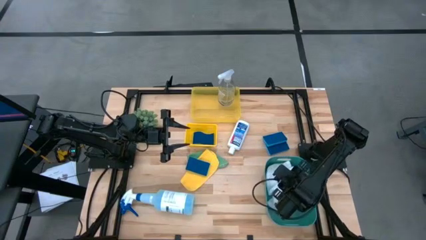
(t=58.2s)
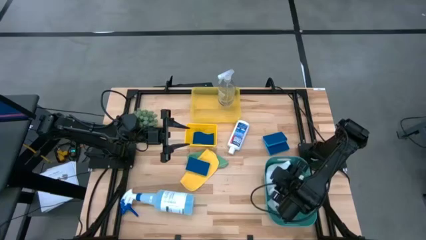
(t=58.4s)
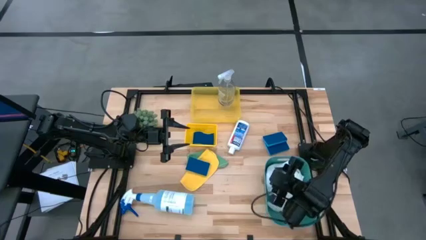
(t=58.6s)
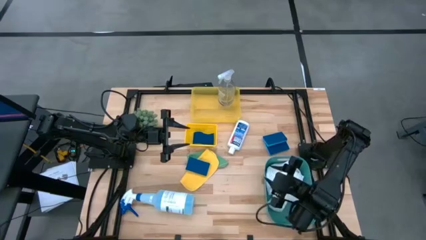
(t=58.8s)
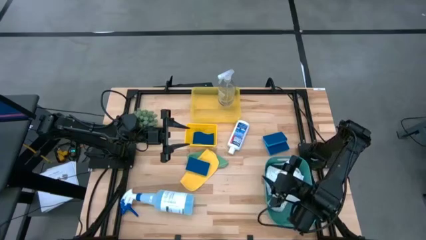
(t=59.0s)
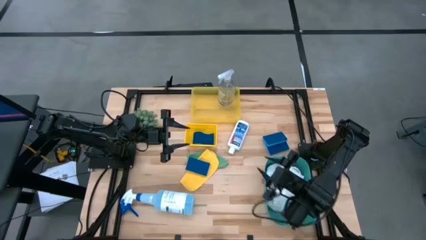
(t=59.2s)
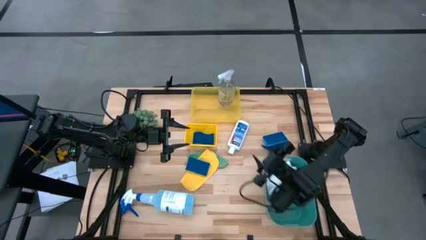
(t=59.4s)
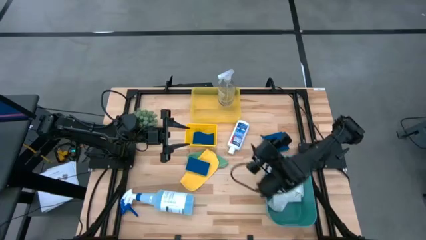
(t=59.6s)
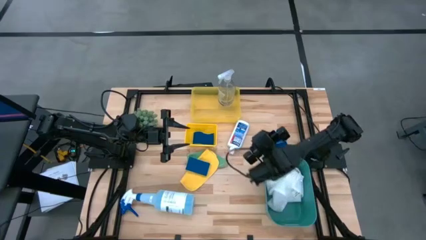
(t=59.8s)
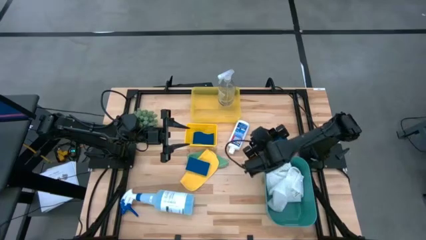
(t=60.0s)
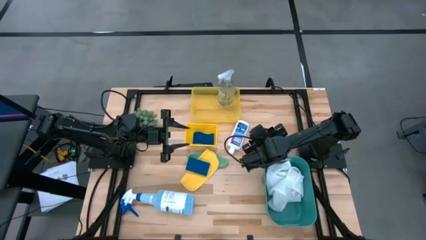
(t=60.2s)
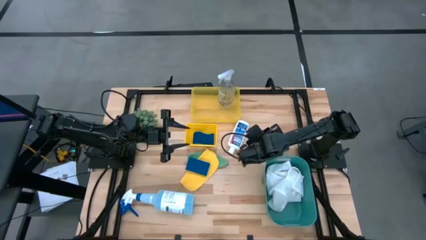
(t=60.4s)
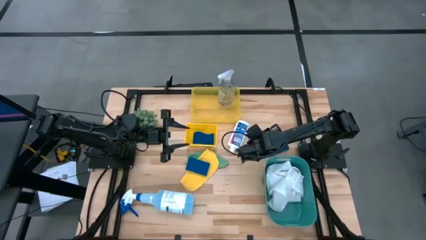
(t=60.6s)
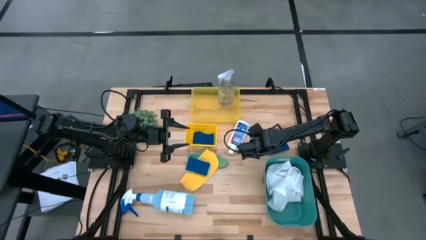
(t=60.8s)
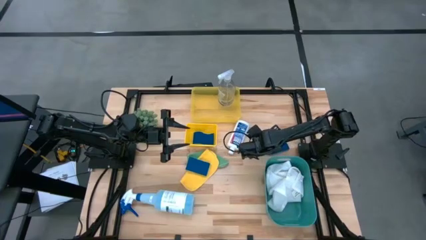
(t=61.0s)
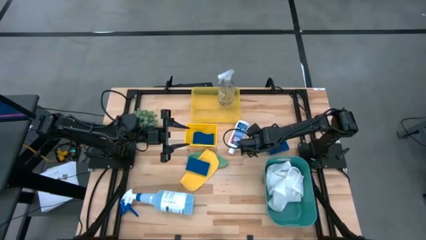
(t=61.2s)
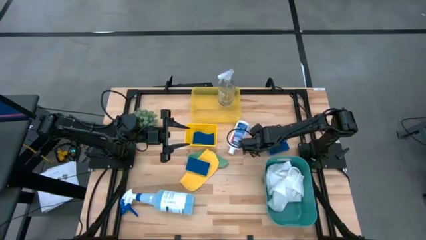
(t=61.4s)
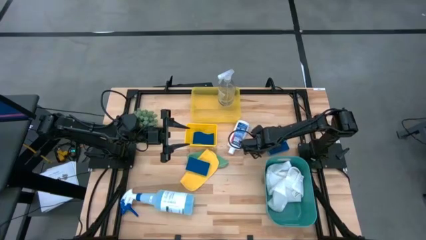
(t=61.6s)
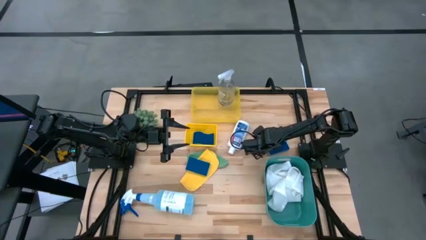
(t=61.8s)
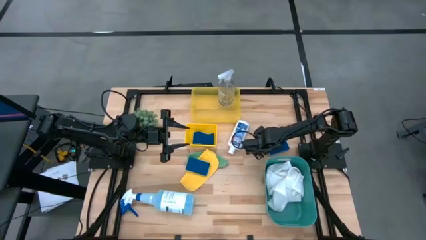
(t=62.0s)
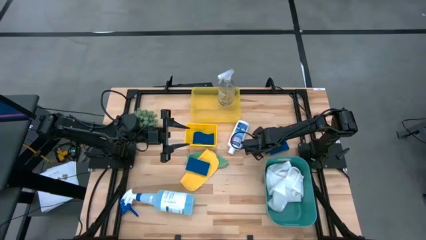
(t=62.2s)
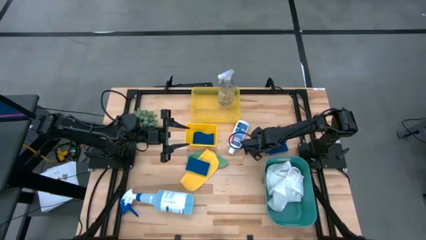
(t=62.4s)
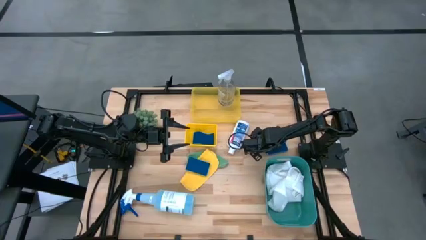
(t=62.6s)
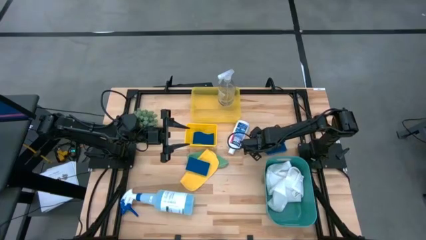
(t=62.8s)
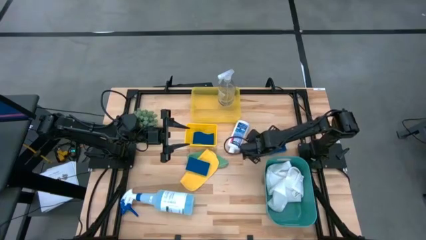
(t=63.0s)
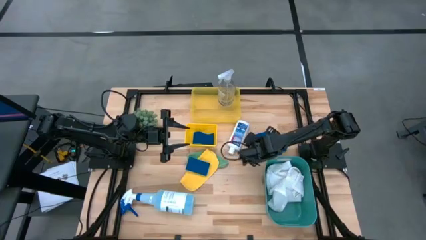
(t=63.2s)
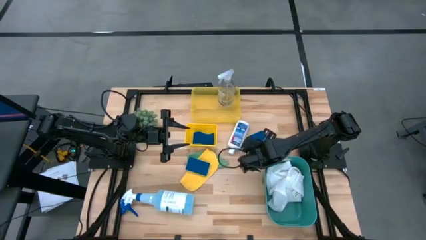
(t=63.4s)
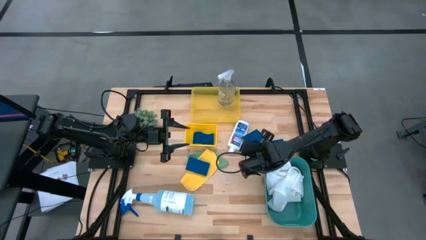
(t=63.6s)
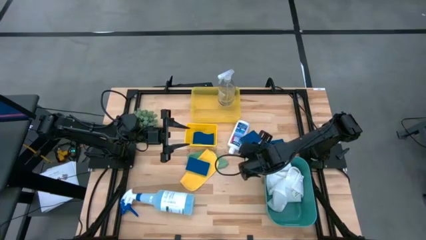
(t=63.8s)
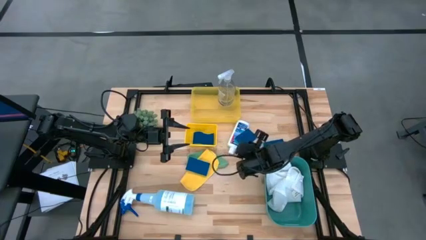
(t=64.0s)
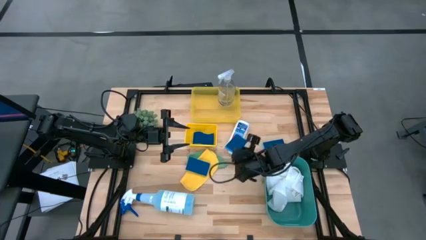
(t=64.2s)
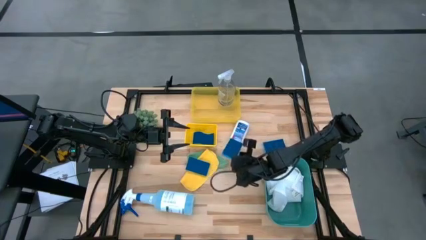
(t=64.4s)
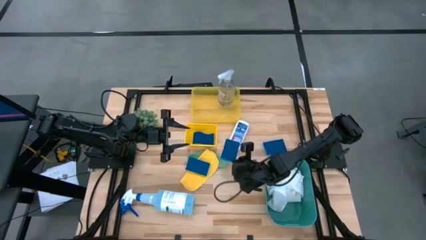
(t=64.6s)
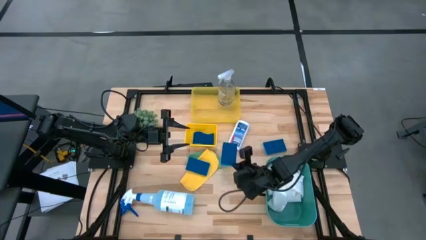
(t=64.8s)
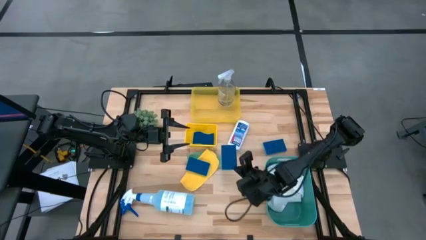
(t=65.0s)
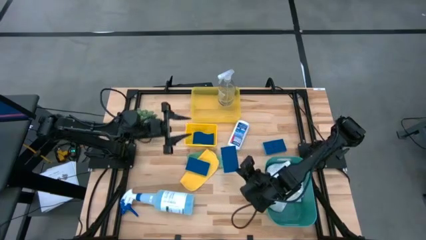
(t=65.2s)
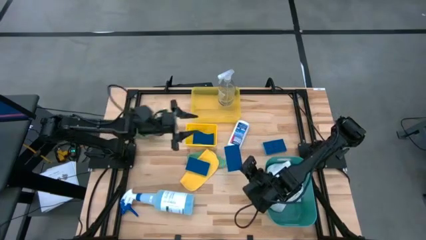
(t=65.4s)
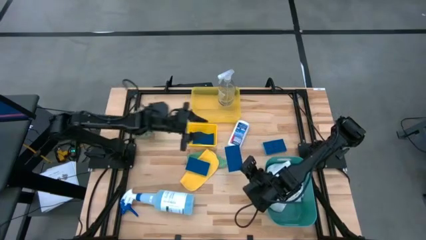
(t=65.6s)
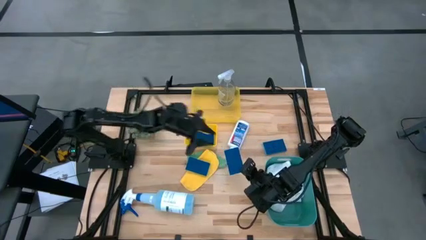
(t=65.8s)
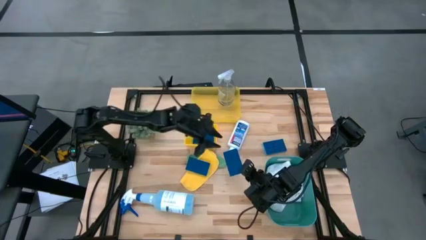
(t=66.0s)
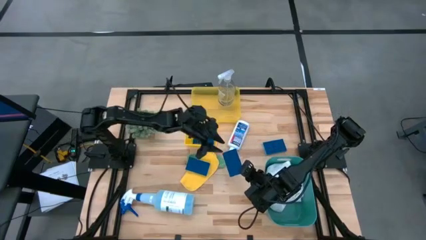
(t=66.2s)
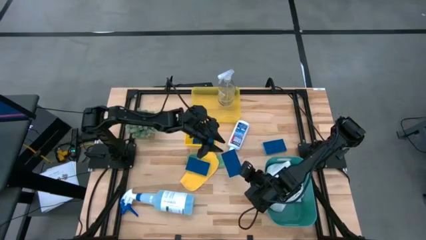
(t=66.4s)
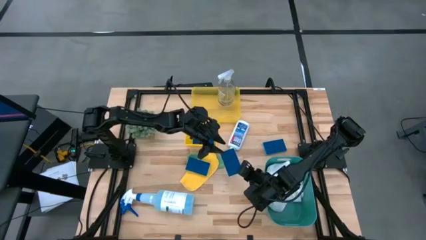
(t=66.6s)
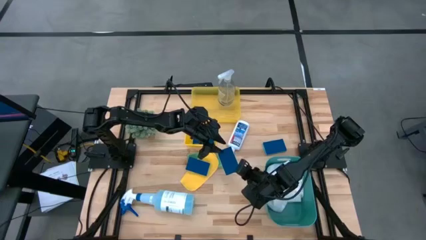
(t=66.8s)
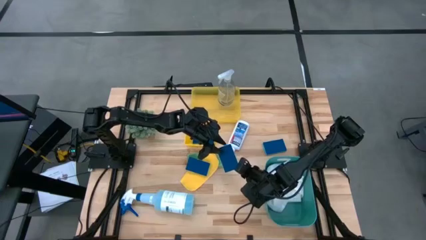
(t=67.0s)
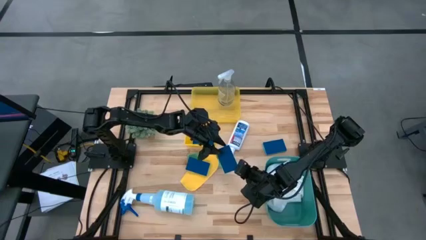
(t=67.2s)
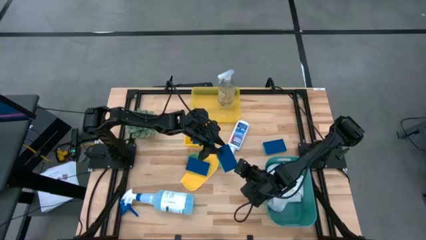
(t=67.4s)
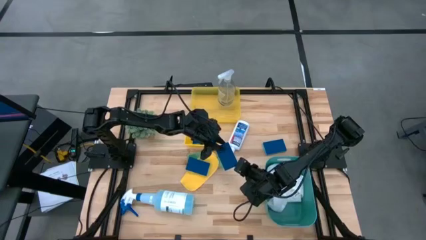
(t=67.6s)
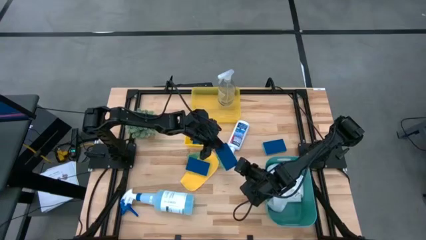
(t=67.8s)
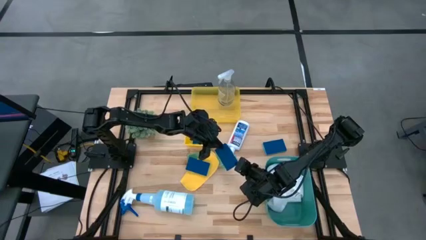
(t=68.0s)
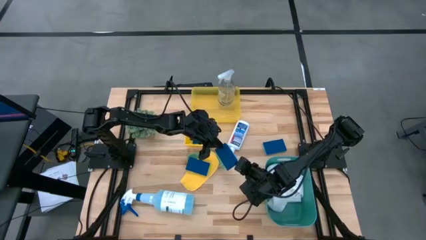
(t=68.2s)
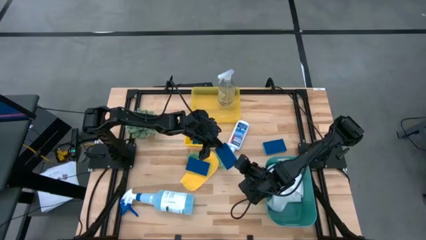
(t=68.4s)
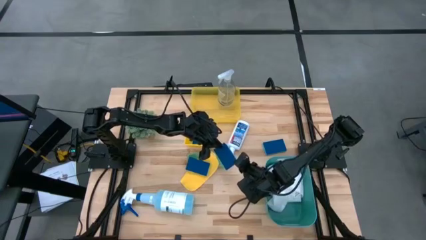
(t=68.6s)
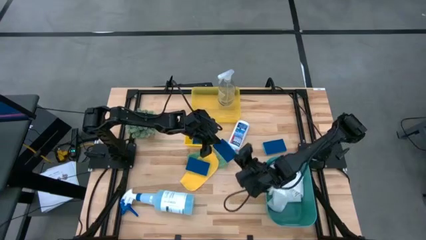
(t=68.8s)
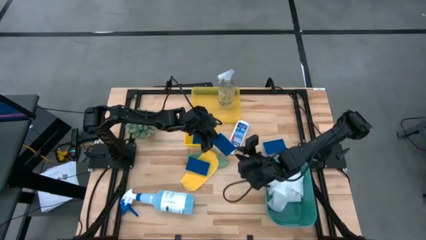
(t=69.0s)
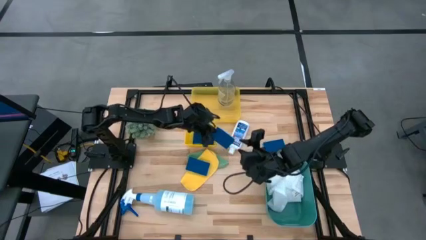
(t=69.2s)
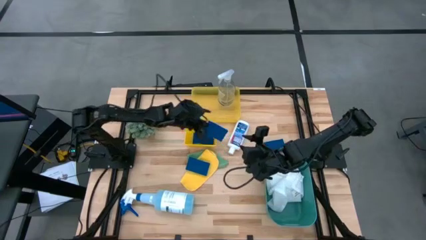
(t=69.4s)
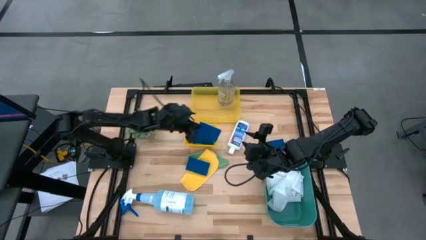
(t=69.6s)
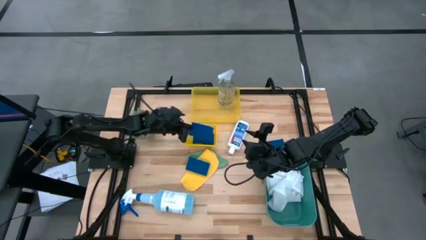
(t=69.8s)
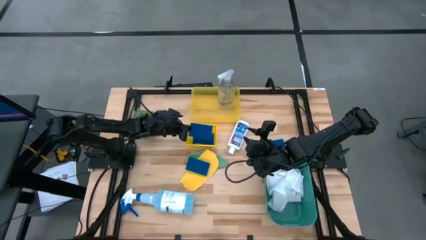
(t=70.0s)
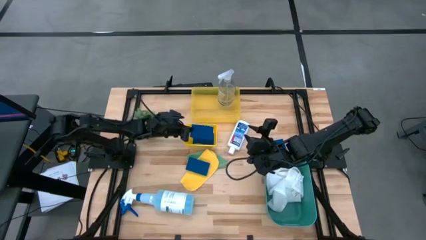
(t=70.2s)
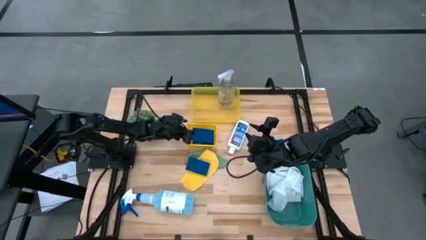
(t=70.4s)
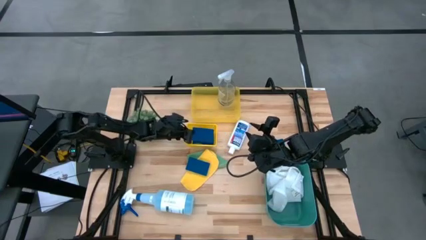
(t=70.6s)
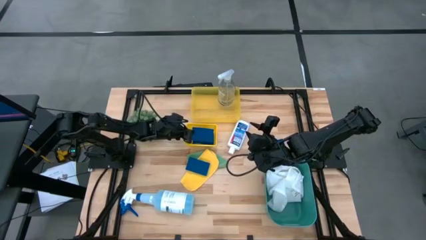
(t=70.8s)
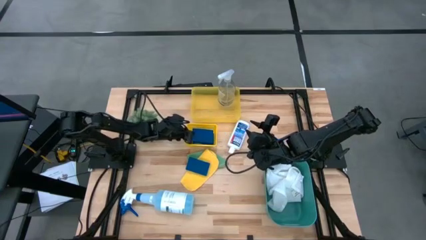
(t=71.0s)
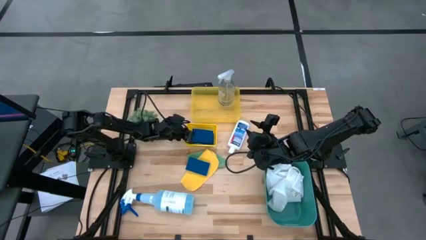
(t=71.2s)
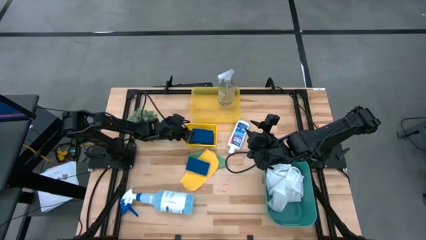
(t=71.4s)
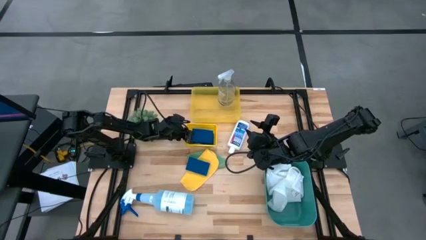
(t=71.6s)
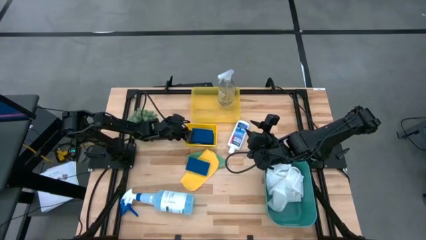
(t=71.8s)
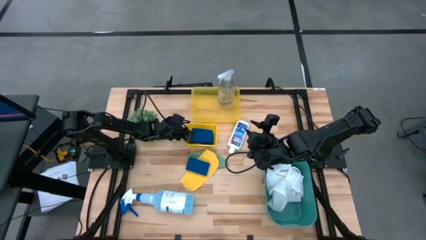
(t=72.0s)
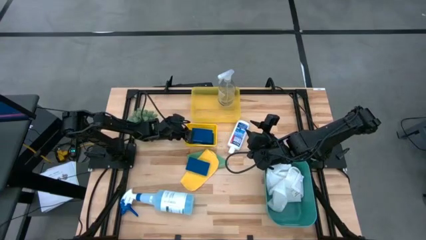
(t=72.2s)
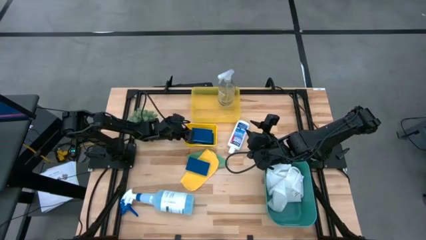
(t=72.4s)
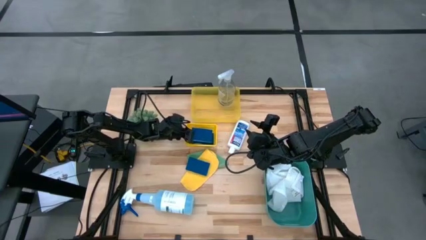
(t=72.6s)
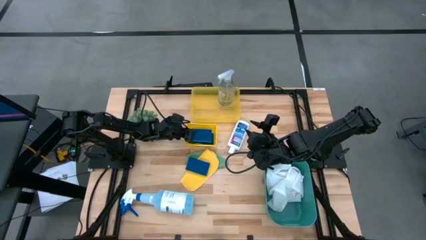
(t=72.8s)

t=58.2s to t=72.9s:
Task: Pick & Place Kitchen Items
Put the blue sponge into the bottom yellow bin
